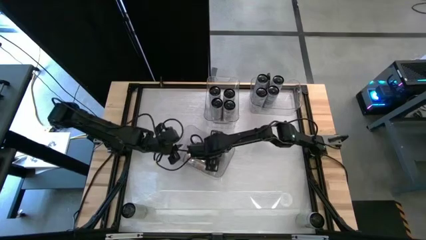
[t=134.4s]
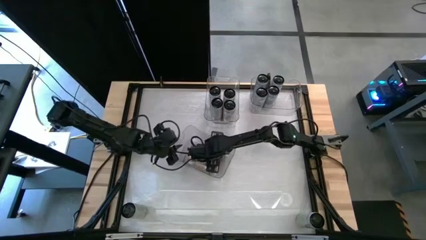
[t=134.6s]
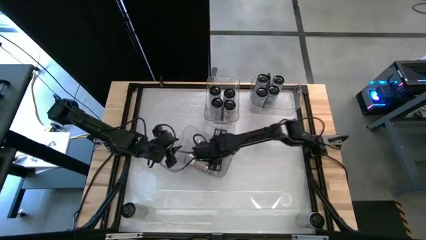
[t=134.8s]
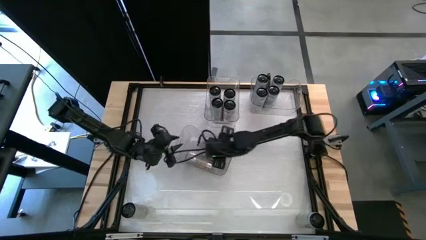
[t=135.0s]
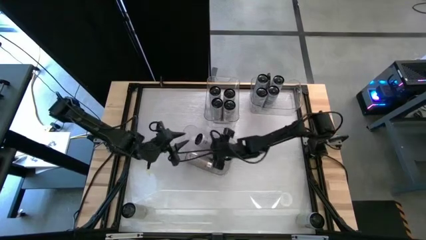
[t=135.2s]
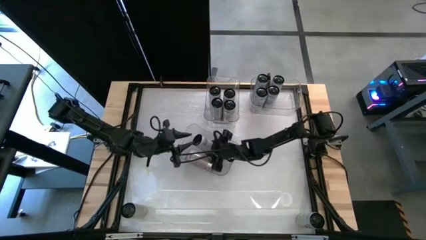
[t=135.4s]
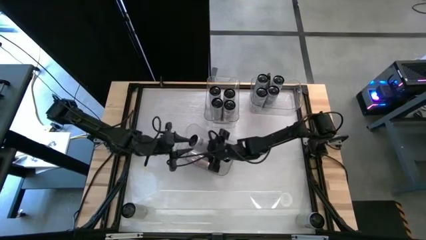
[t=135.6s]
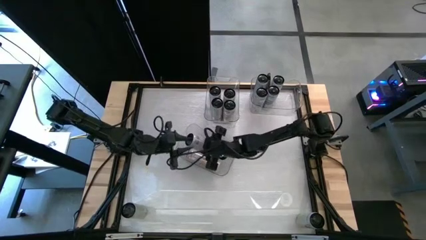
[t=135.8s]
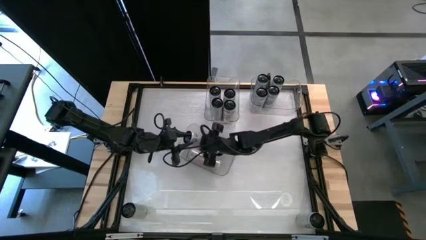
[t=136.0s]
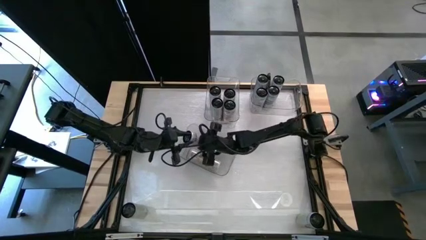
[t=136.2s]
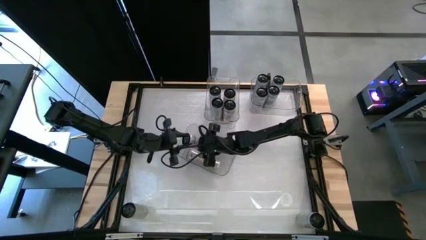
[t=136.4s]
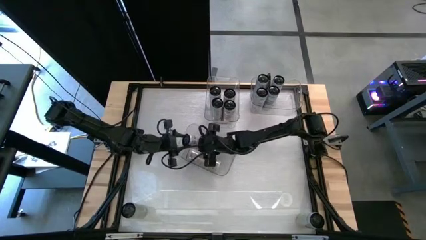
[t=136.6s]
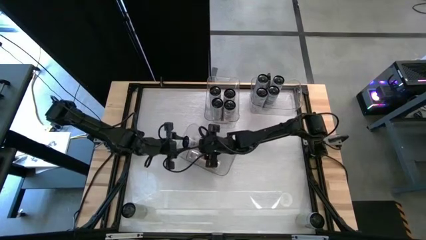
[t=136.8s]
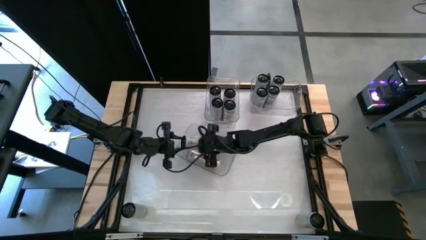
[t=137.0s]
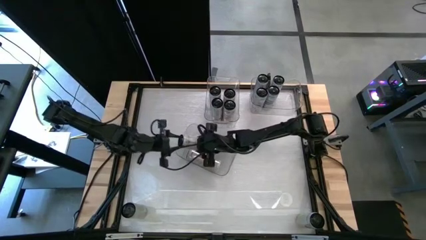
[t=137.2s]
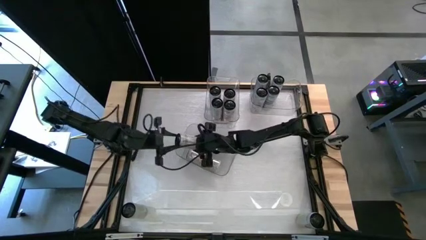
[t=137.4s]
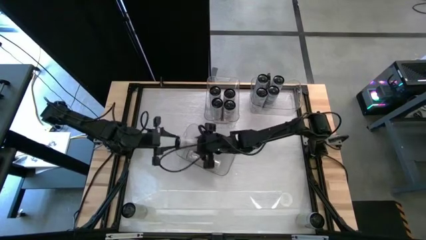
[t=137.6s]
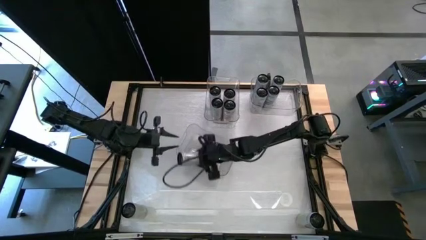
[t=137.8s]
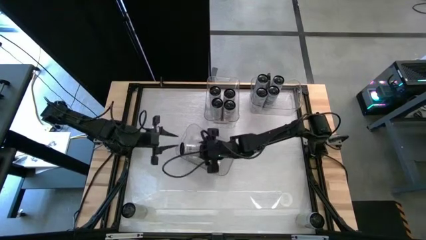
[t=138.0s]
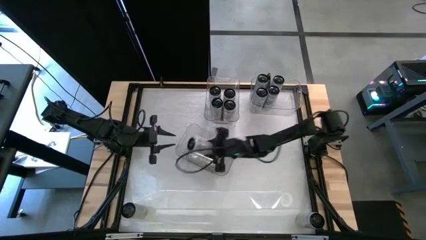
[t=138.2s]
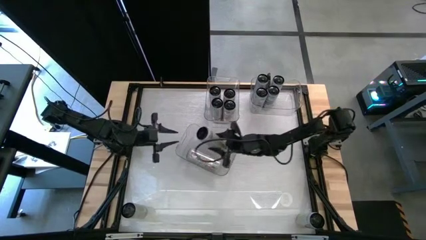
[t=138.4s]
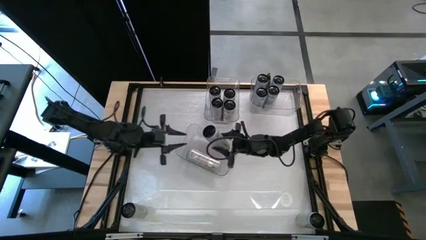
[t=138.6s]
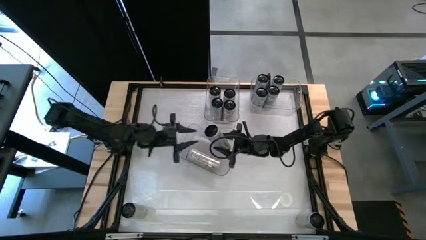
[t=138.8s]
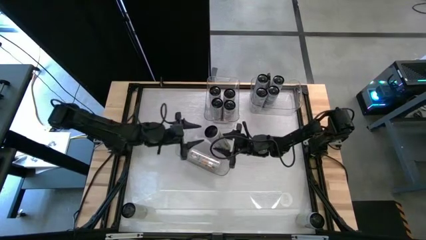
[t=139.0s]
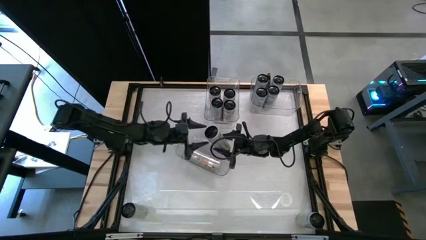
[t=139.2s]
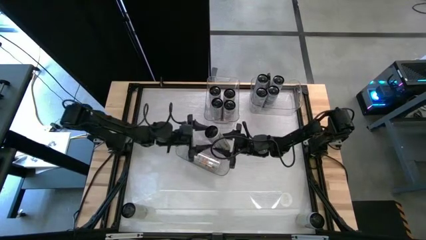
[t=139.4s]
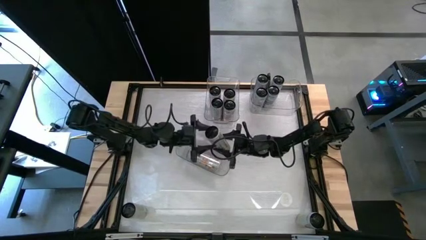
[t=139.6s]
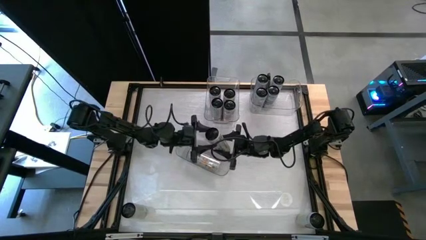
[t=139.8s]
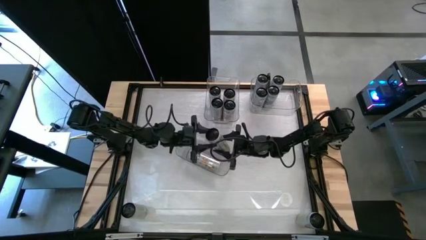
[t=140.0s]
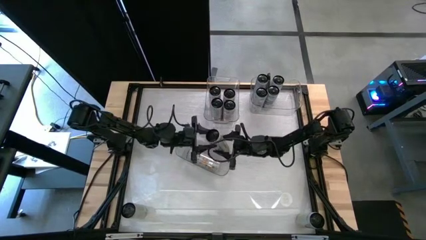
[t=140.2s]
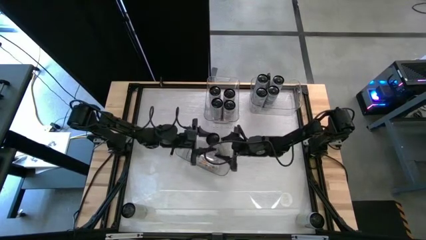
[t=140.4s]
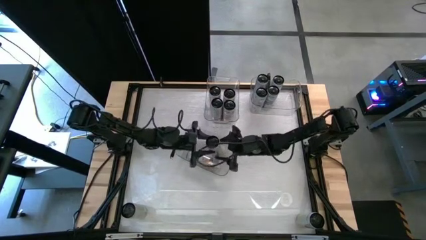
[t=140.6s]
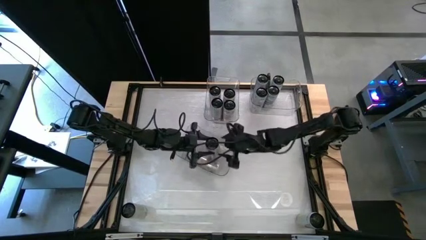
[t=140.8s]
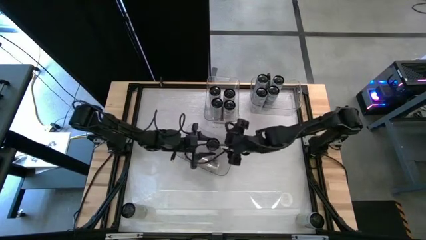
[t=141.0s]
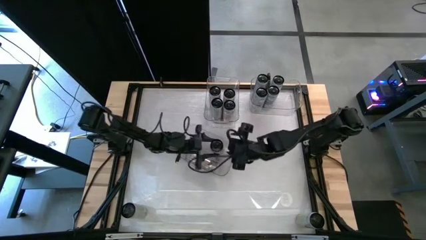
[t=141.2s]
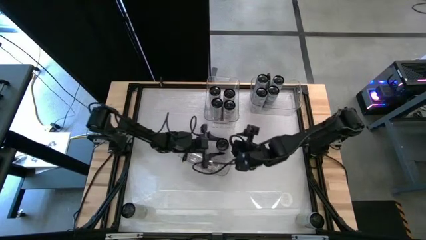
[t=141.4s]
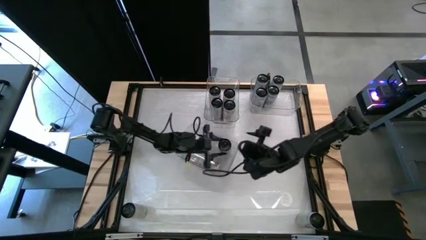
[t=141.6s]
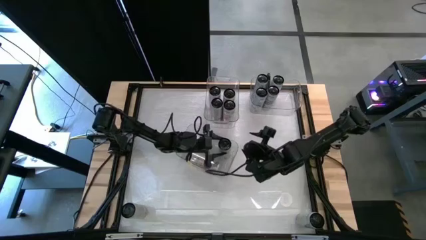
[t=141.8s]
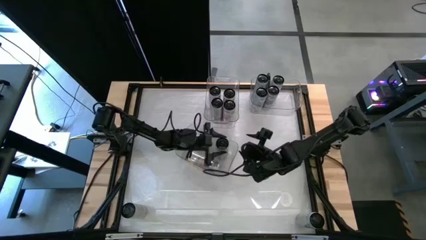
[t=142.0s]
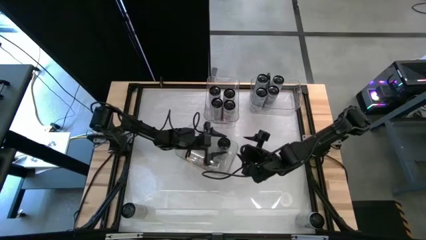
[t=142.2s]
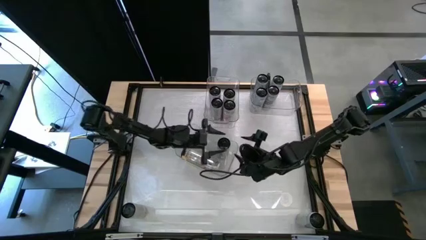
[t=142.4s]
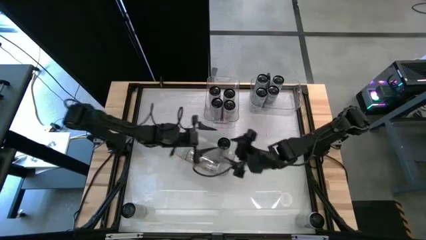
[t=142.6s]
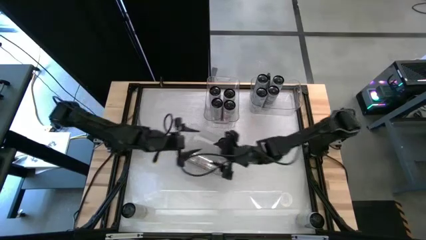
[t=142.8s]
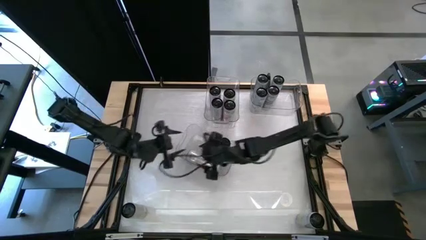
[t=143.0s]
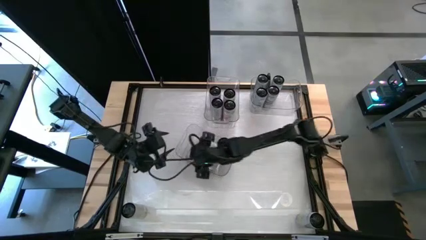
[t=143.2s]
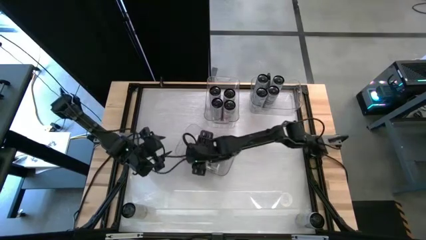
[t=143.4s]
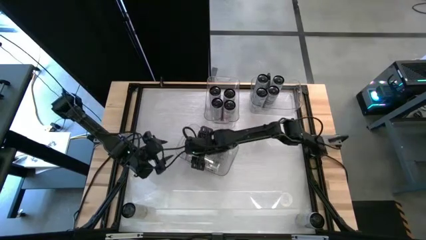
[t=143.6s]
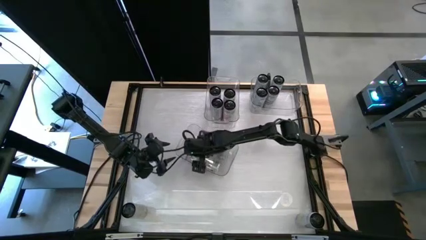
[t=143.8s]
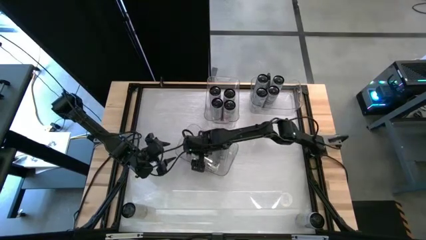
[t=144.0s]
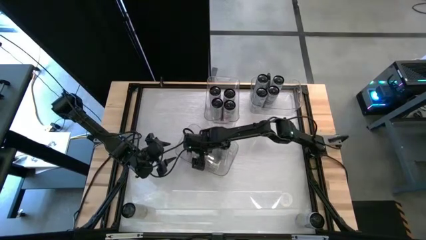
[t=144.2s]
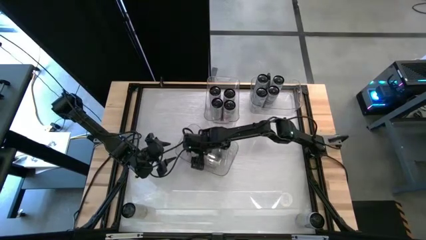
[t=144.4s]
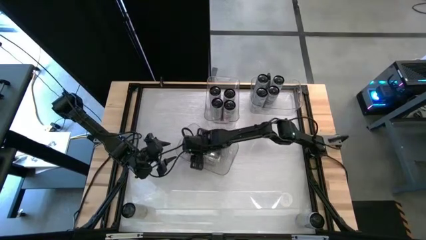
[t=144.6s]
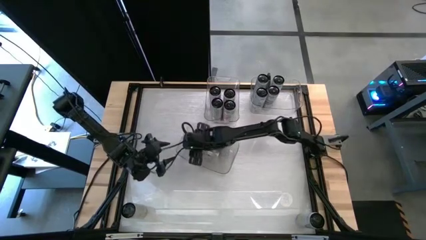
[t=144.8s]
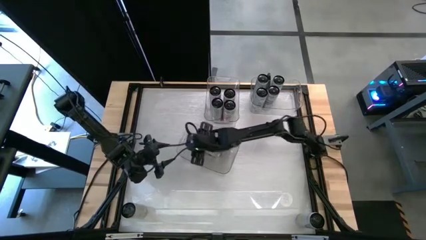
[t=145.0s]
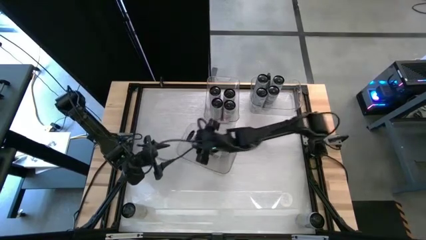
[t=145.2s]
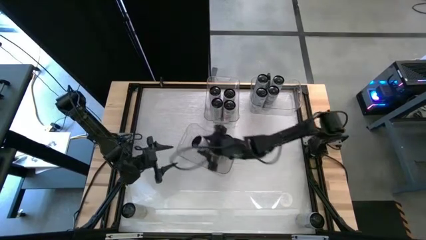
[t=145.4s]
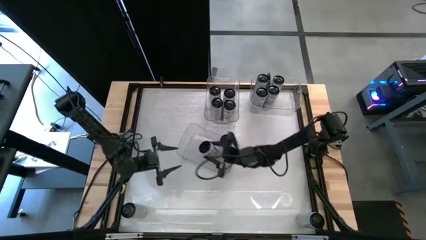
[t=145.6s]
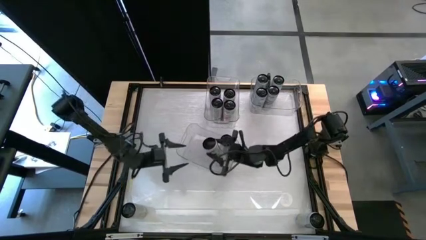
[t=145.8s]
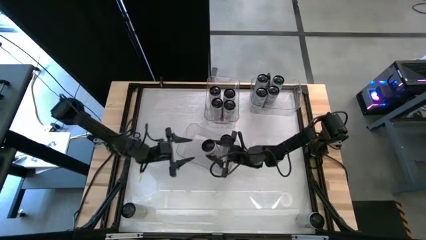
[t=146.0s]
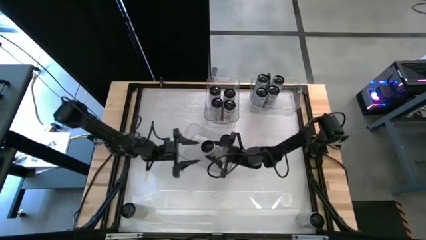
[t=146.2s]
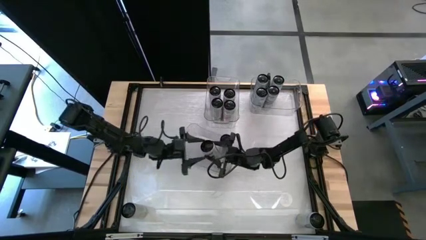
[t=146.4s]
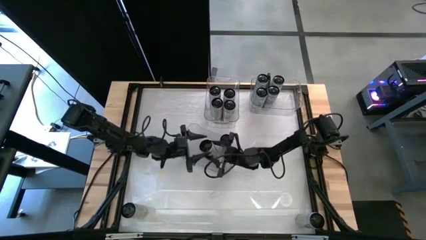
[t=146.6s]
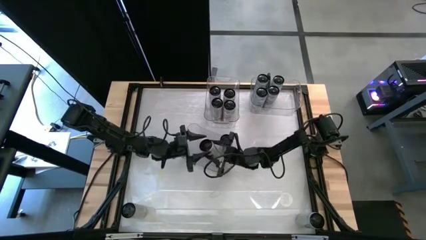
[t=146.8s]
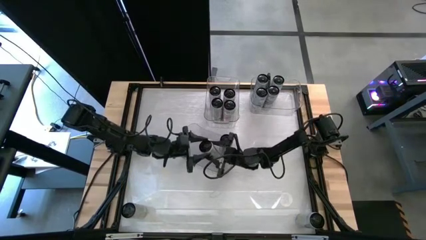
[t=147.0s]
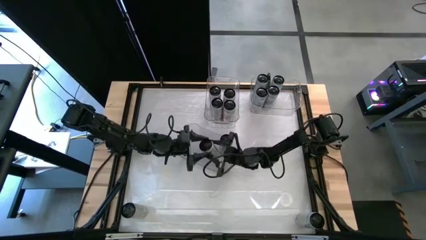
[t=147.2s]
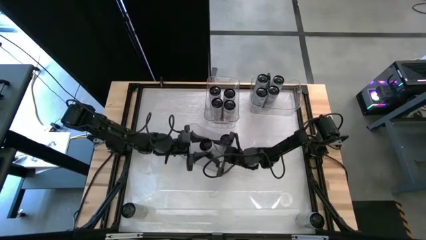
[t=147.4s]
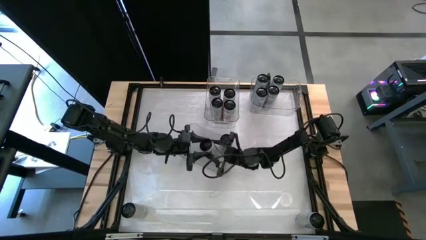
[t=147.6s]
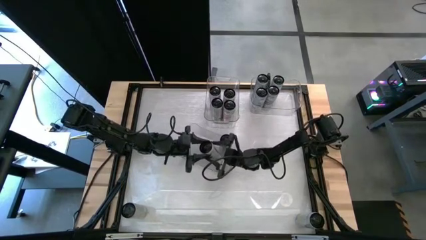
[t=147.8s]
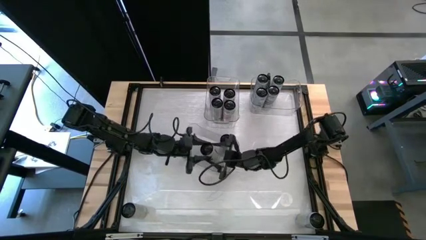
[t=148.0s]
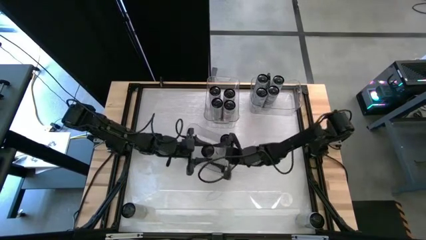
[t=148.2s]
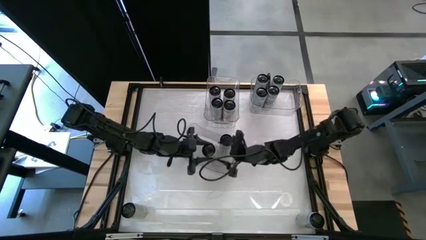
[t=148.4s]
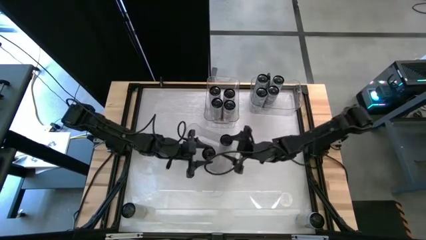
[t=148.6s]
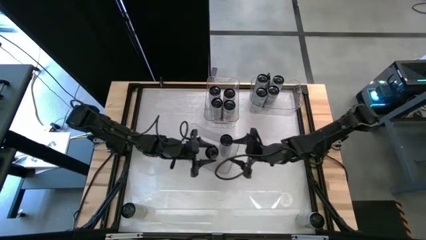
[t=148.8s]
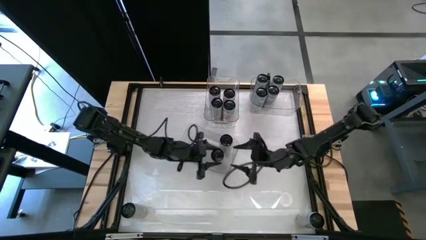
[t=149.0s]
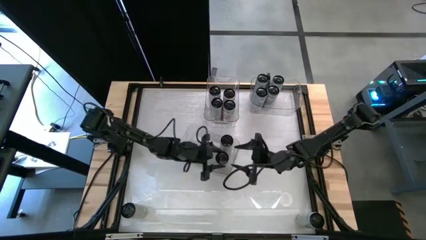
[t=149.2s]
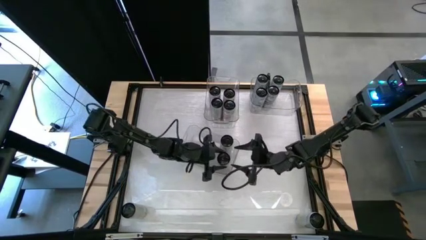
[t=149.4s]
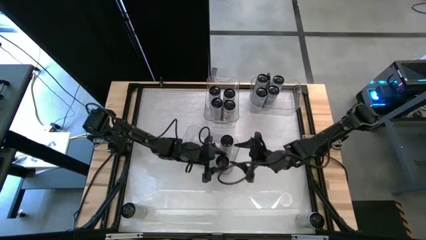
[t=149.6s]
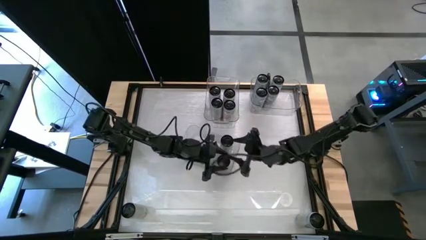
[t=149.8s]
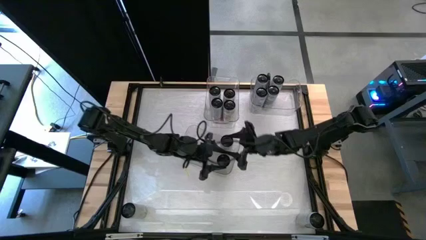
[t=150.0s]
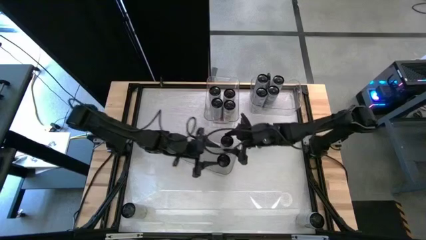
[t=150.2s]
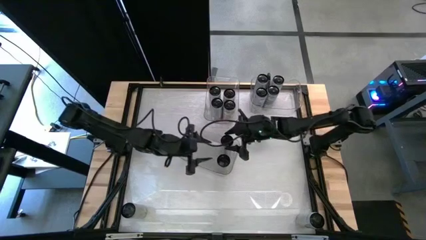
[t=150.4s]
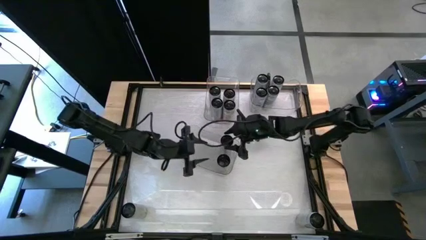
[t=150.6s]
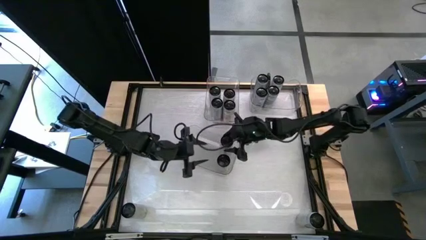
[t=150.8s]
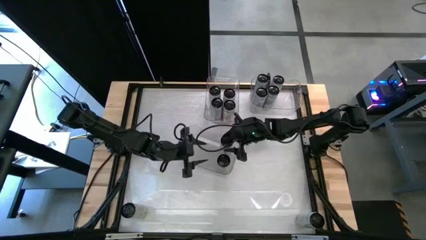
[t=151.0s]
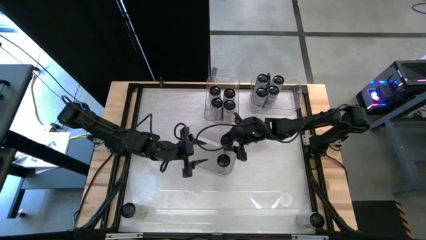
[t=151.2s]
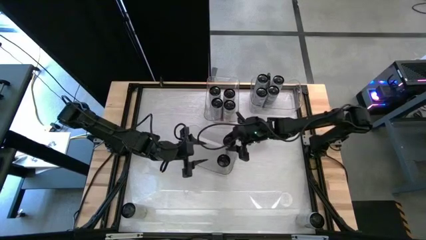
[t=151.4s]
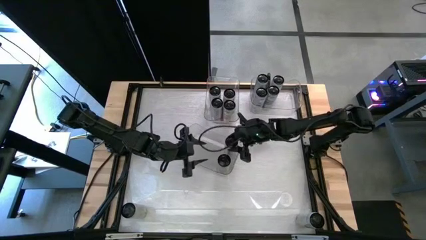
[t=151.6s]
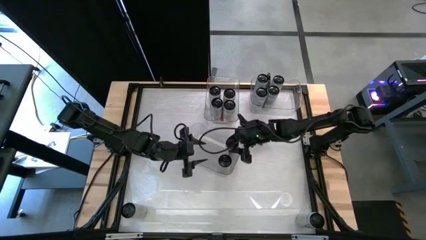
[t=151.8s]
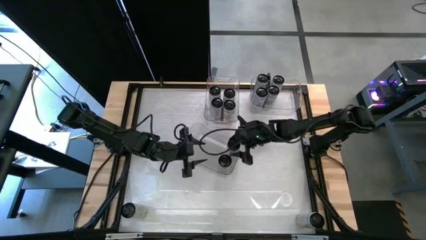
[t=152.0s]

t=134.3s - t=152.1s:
Task: Sort soda cans
Adjust the cans in the bottom transparent bin
